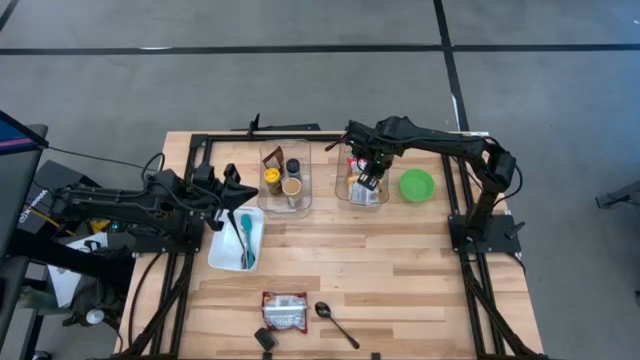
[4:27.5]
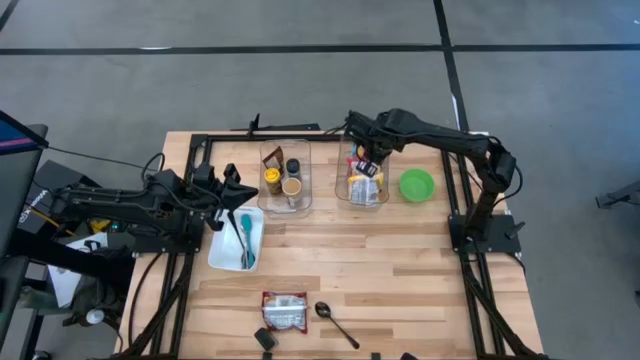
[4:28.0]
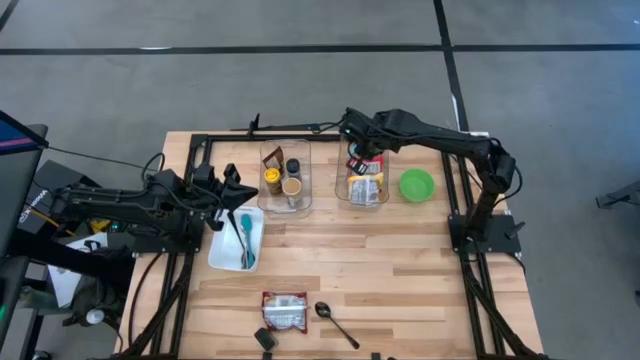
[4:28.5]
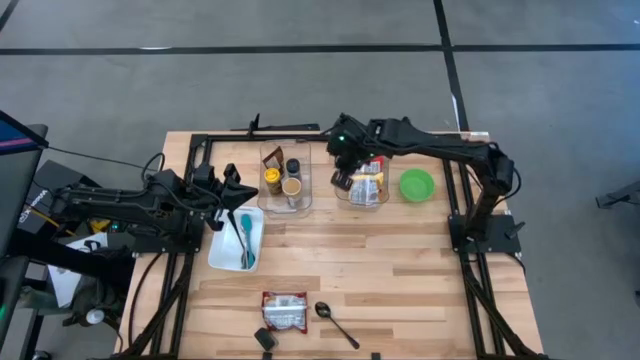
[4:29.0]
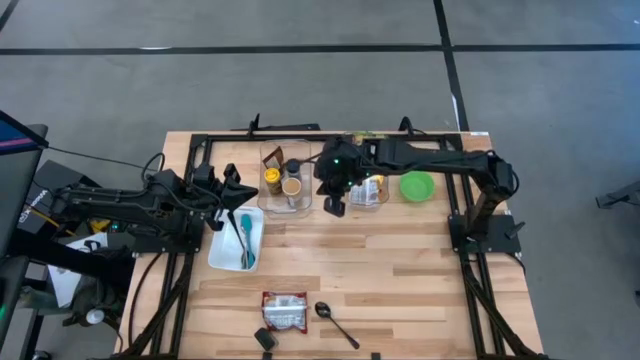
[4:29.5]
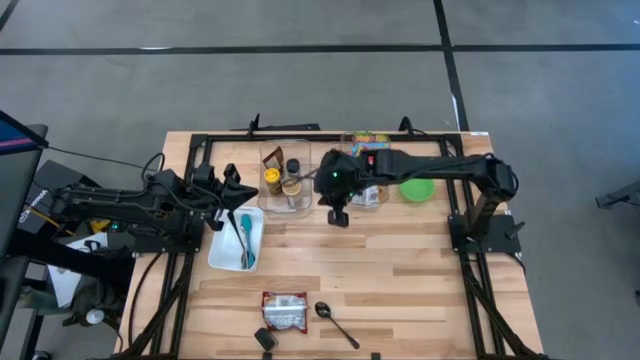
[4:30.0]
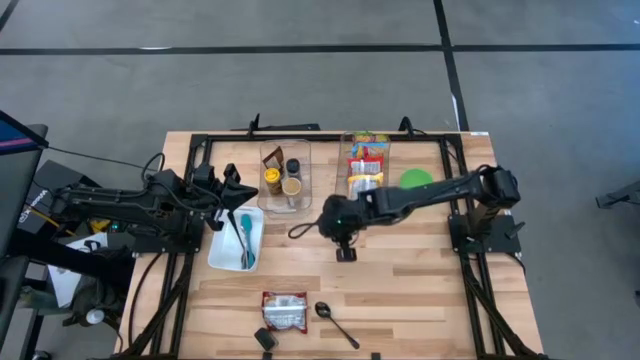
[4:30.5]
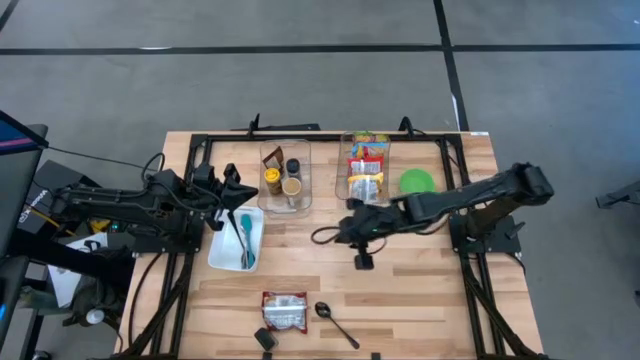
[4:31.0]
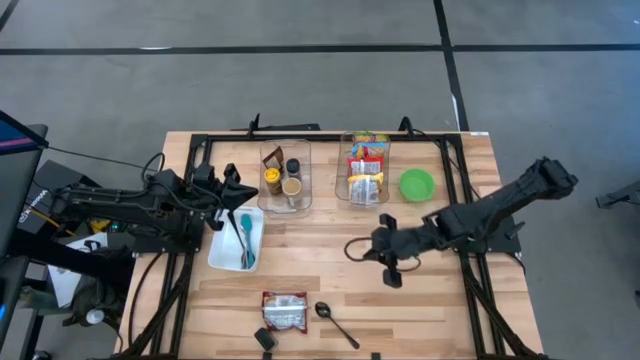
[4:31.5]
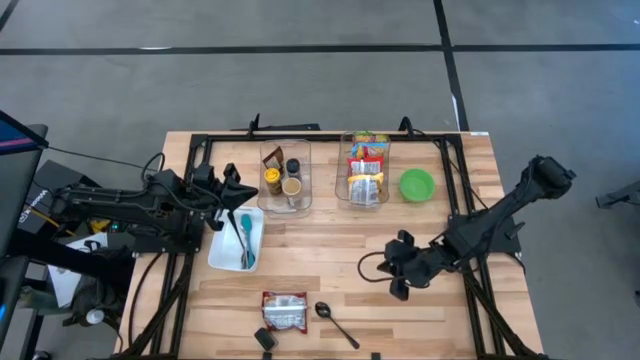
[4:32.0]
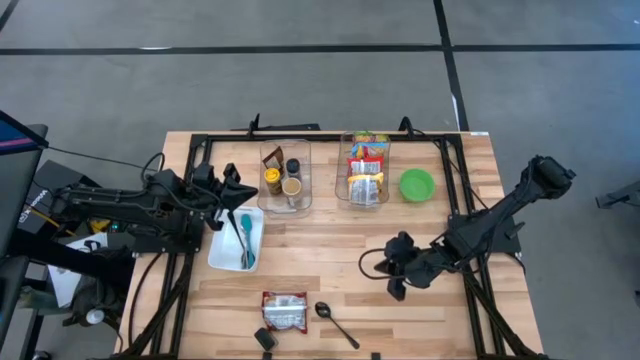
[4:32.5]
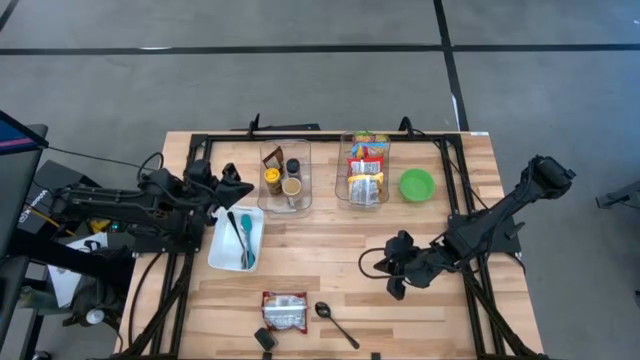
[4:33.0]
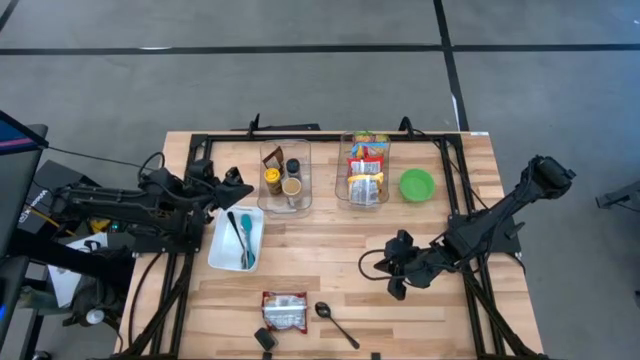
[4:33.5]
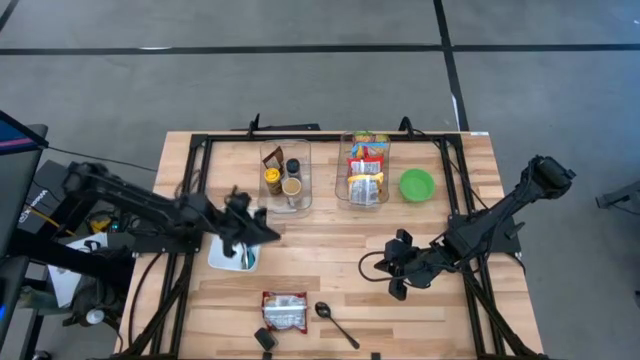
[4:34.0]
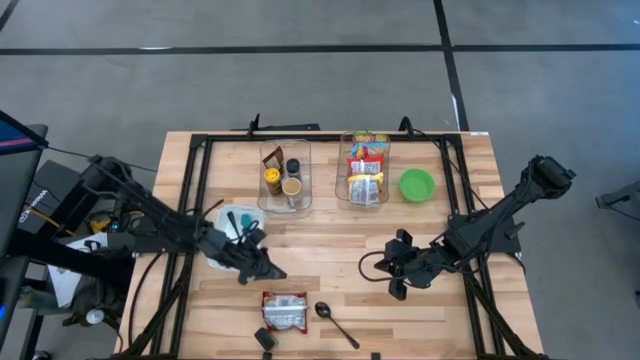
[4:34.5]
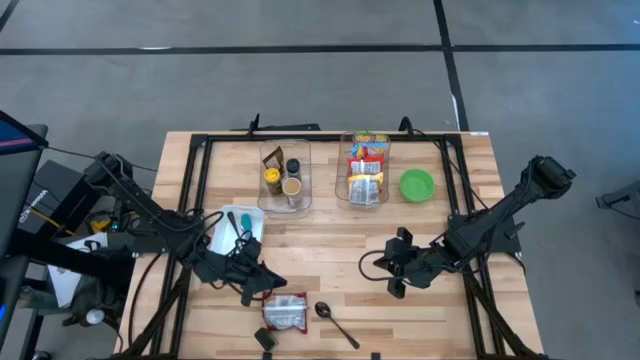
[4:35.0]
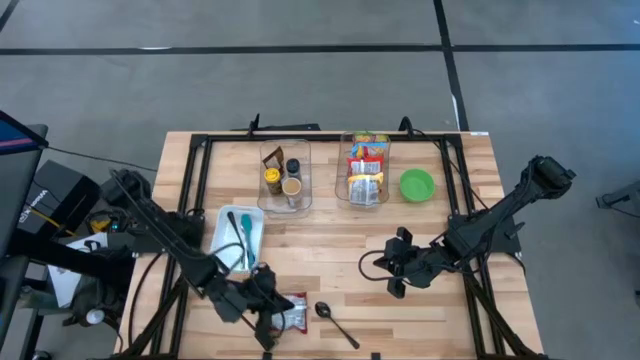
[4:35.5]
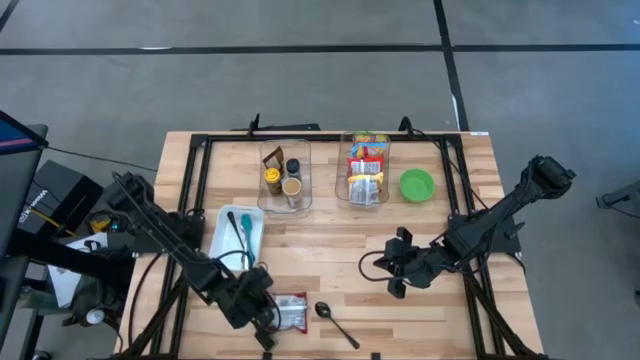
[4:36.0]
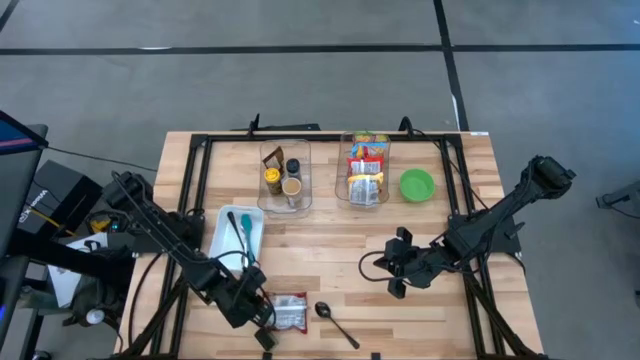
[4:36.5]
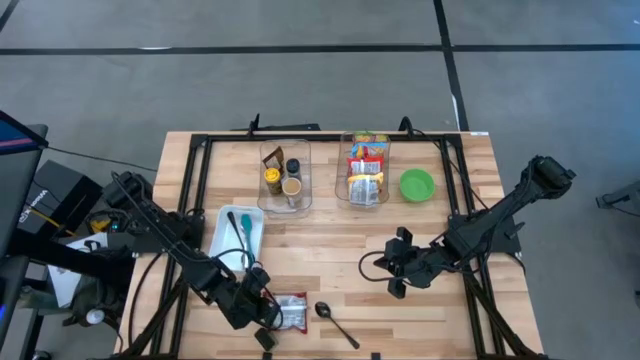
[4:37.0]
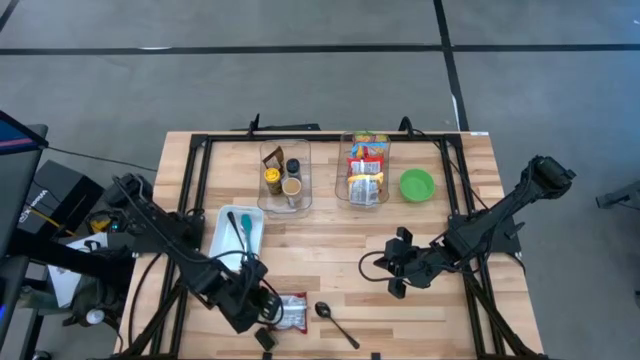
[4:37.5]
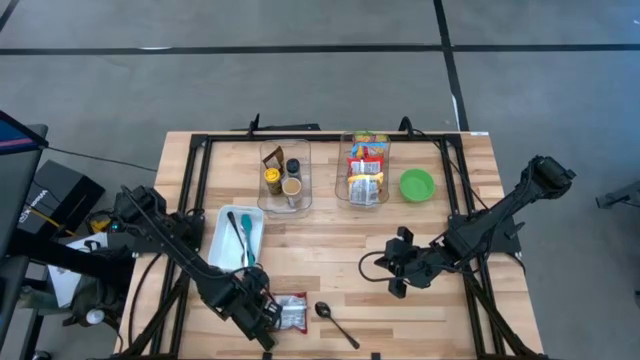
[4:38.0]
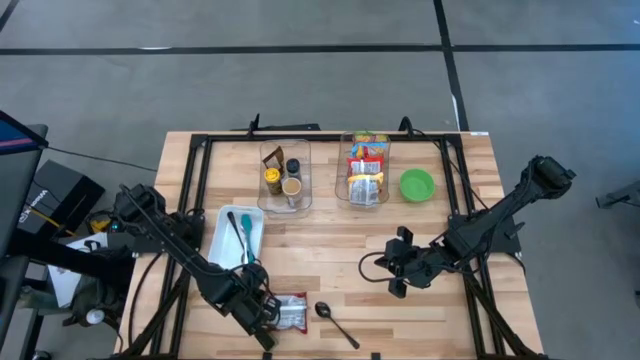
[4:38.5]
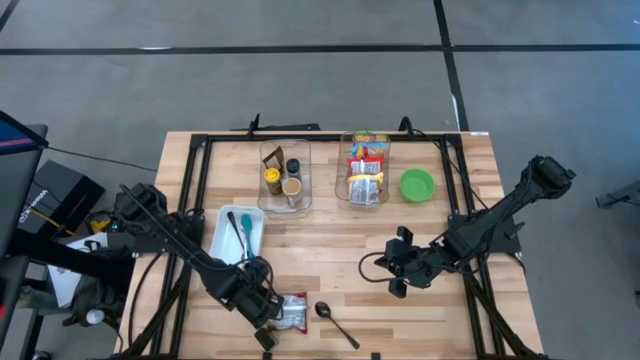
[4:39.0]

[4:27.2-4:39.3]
Task: Pick & Place Food Item
Put the dark red noodle pack into the right transparent bin

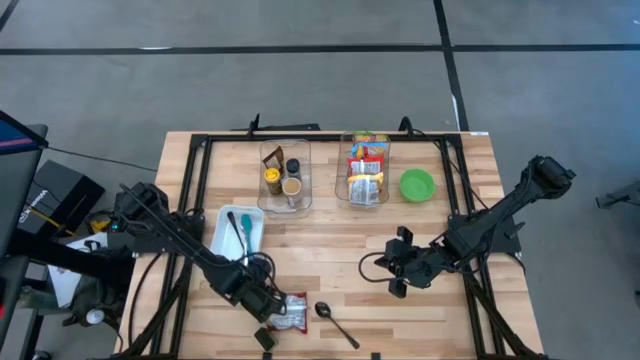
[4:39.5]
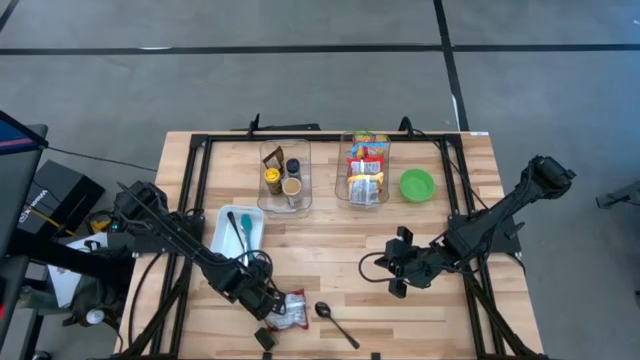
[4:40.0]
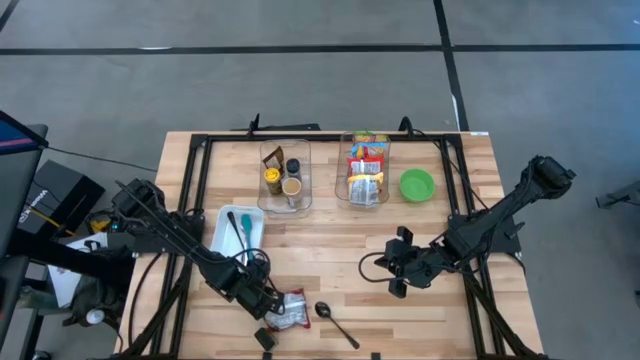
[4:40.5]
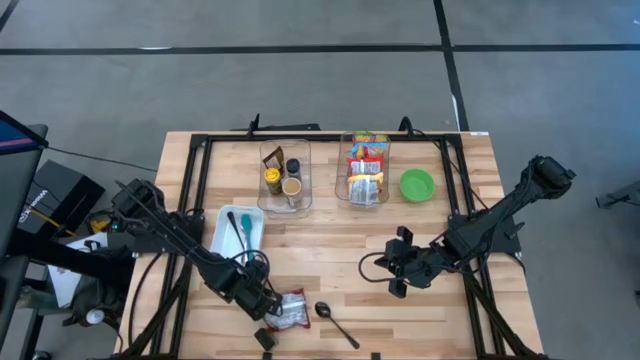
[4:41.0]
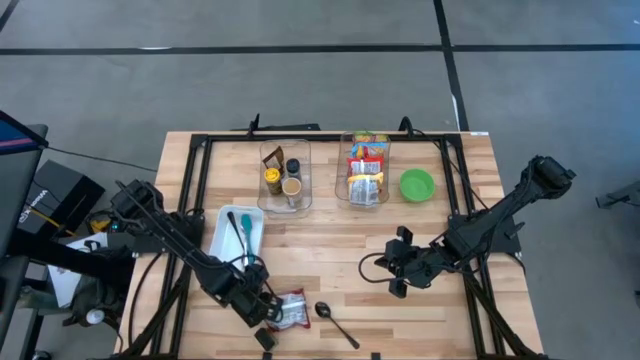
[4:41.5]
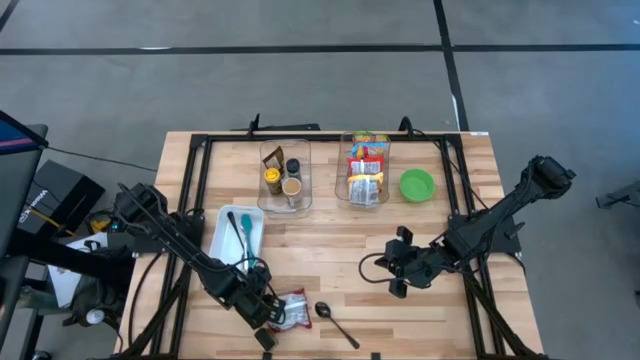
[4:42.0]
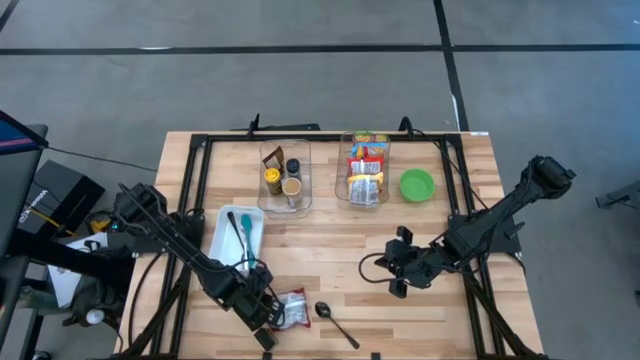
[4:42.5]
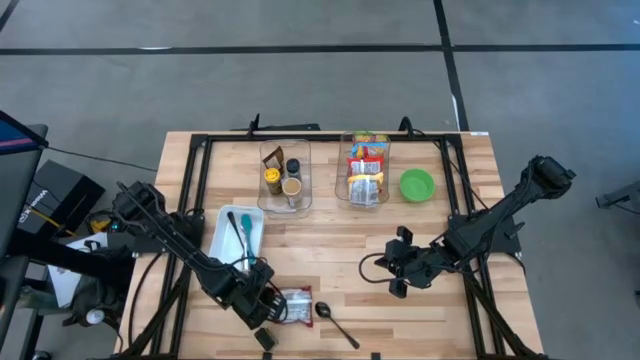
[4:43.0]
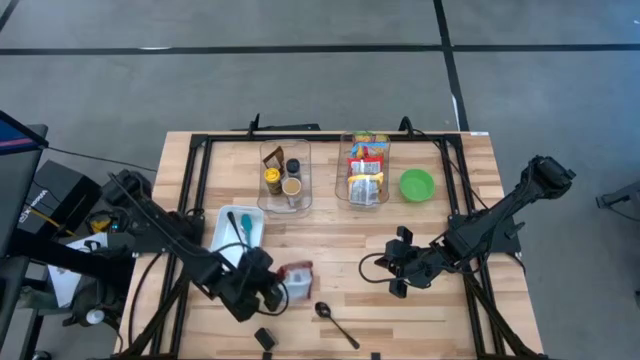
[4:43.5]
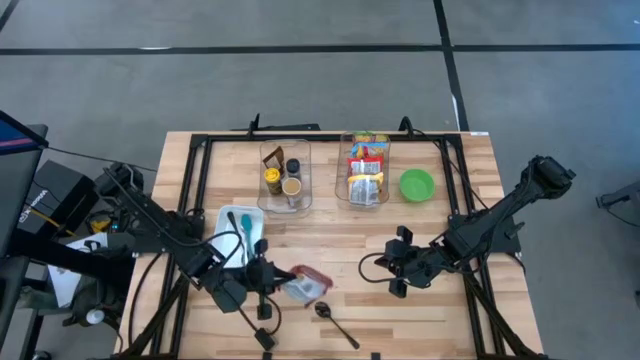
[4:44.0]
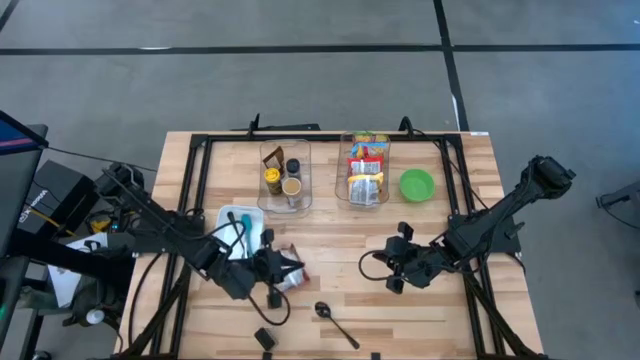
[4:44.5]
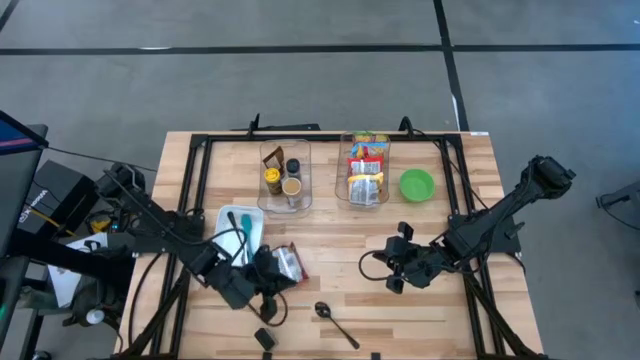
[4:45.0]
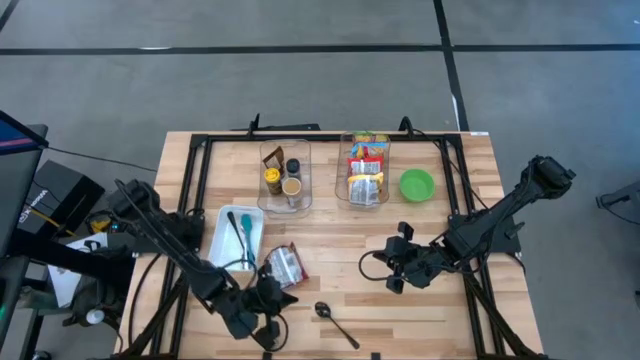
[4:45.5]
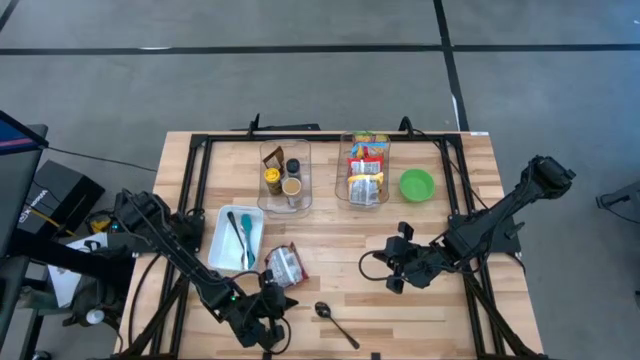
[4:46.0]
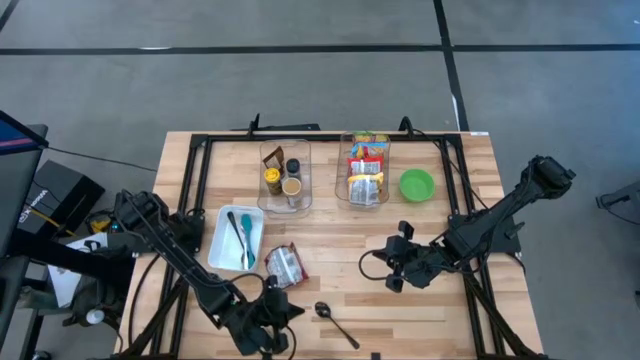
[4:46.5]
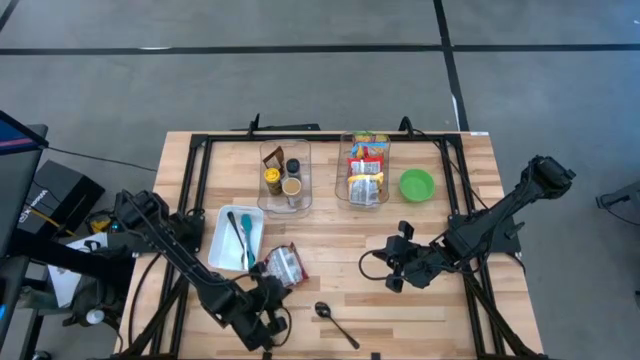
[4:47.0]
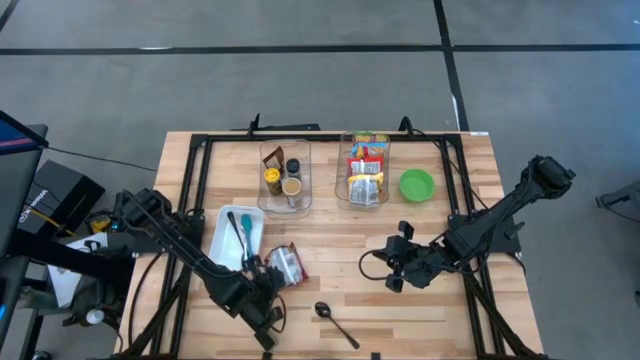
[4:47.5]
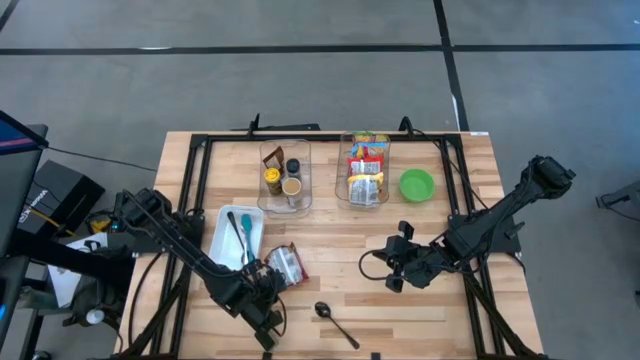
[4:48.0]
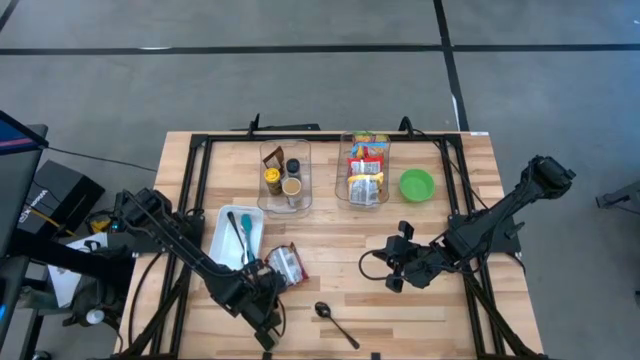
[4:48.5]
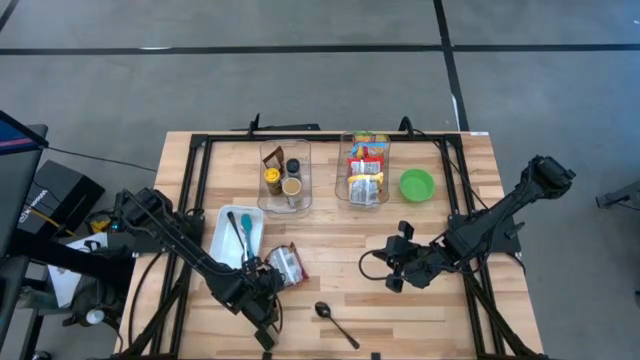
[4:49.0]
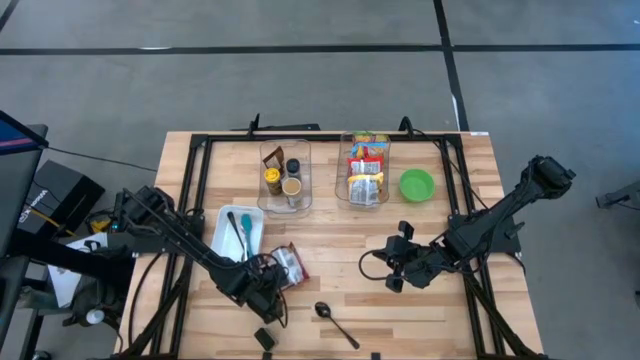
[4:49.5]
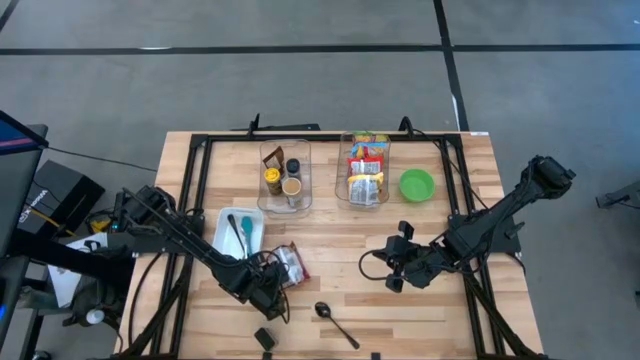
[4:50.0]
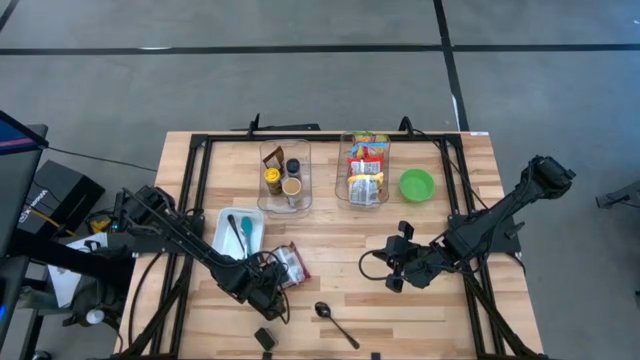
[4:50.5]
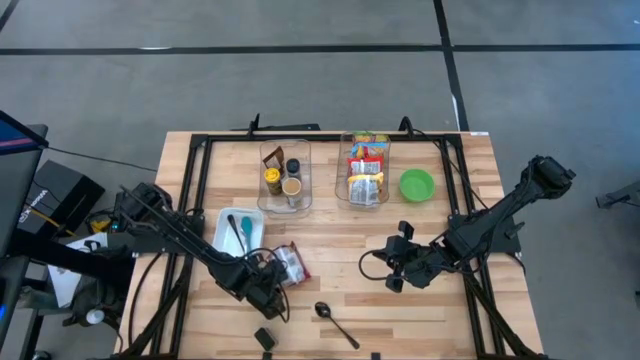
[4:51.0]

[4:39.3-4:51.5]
Put the dark red noodle pack into the right transparent bin
